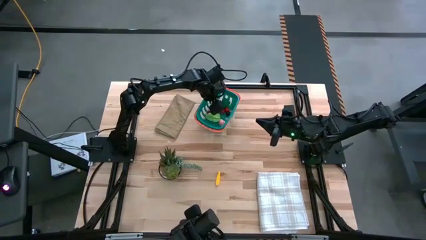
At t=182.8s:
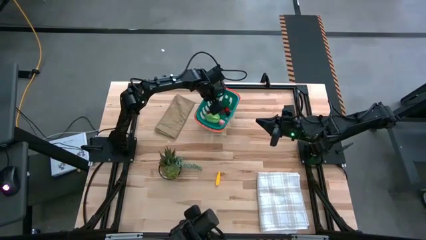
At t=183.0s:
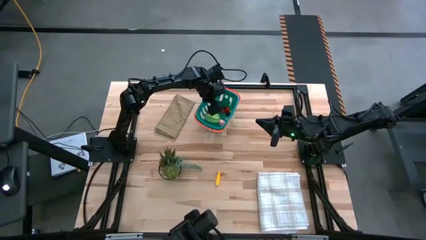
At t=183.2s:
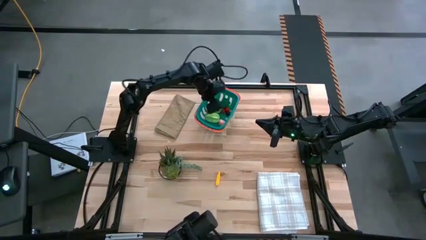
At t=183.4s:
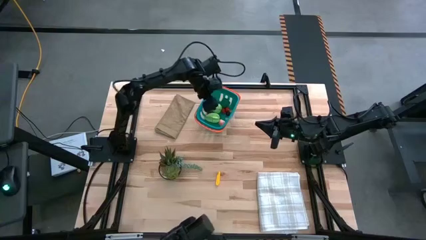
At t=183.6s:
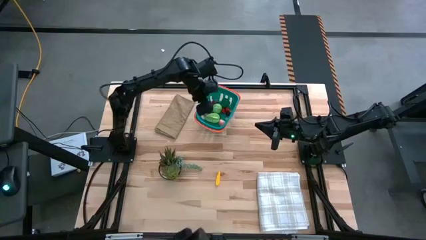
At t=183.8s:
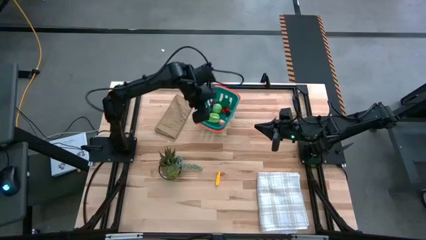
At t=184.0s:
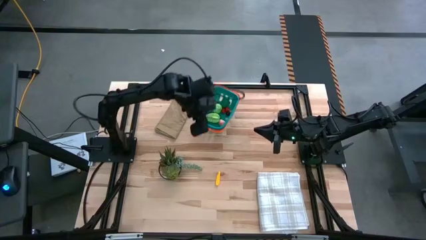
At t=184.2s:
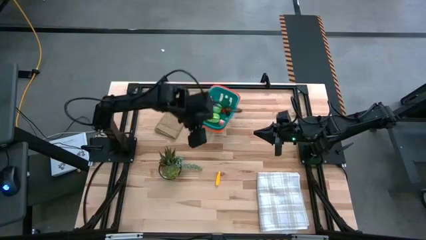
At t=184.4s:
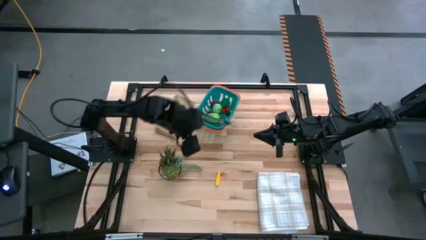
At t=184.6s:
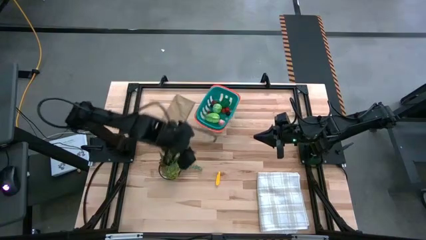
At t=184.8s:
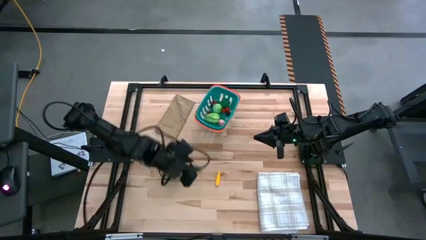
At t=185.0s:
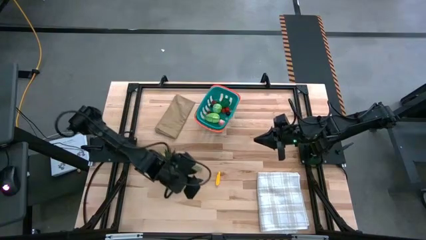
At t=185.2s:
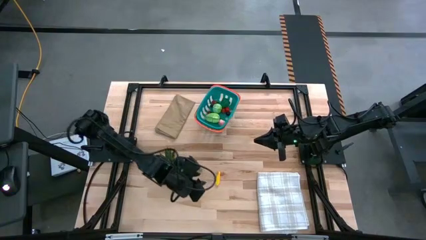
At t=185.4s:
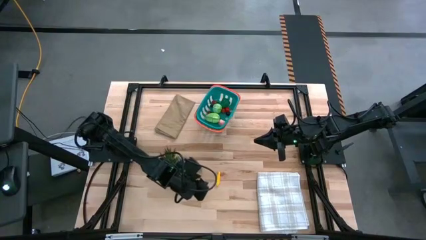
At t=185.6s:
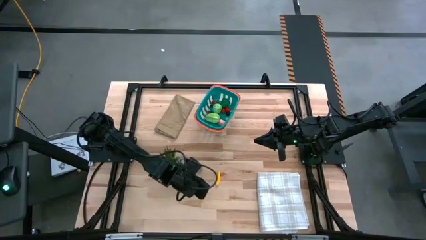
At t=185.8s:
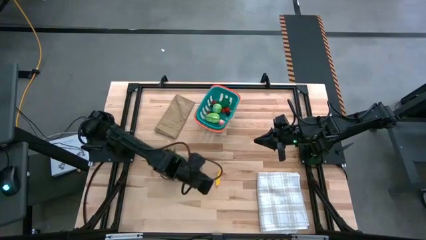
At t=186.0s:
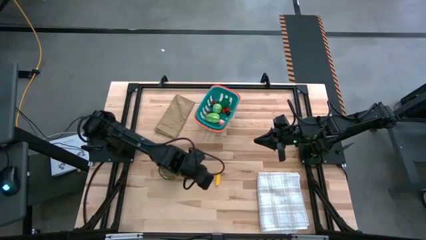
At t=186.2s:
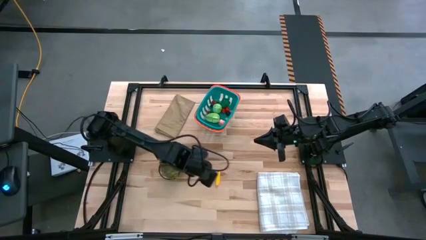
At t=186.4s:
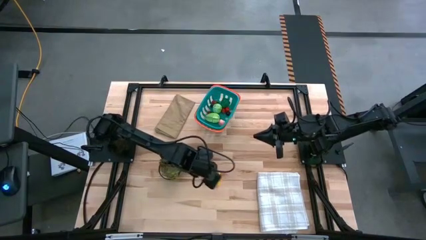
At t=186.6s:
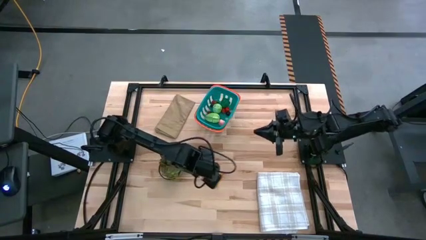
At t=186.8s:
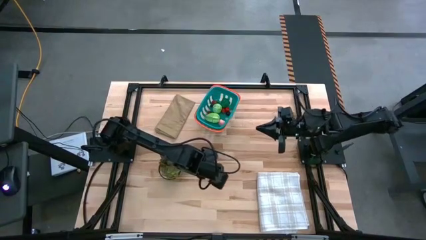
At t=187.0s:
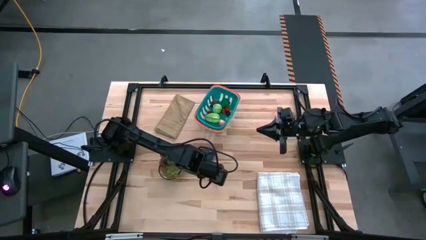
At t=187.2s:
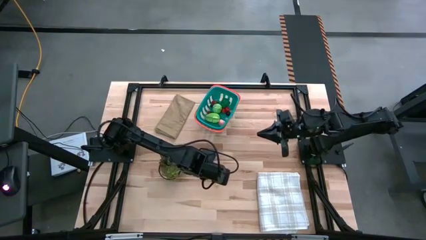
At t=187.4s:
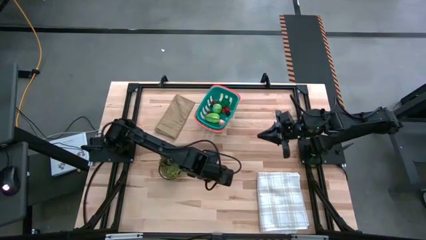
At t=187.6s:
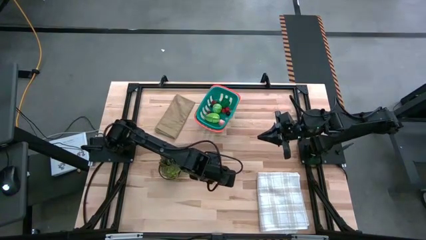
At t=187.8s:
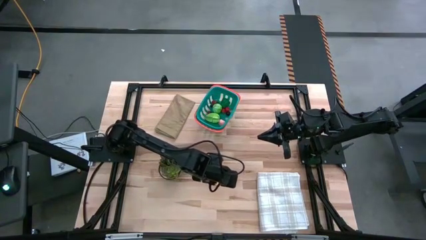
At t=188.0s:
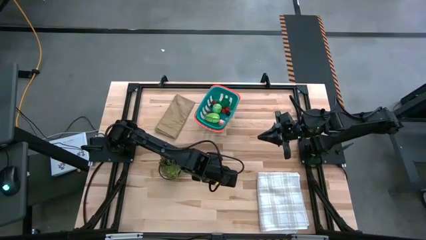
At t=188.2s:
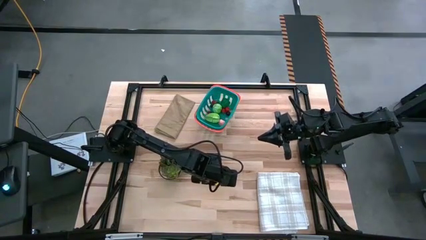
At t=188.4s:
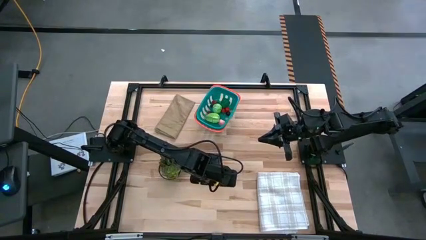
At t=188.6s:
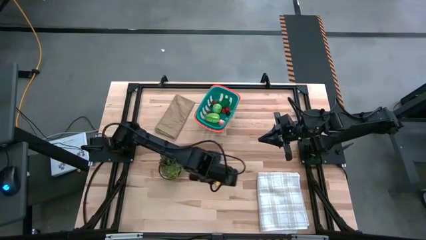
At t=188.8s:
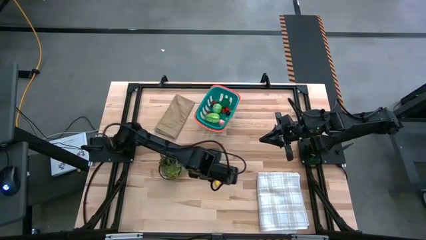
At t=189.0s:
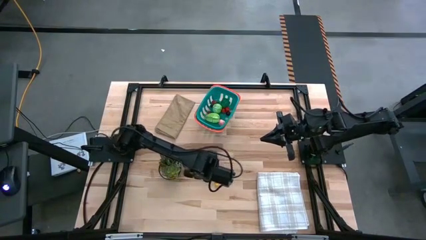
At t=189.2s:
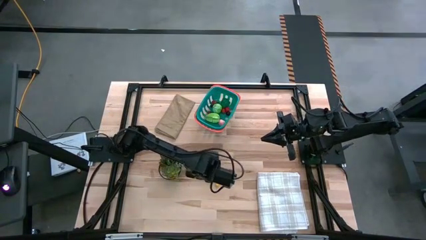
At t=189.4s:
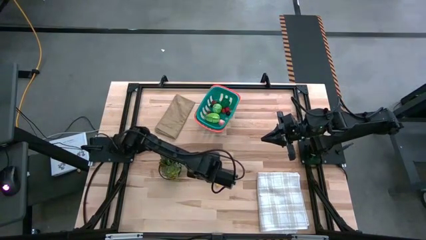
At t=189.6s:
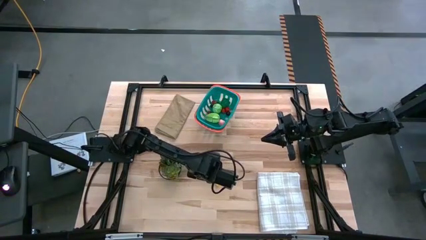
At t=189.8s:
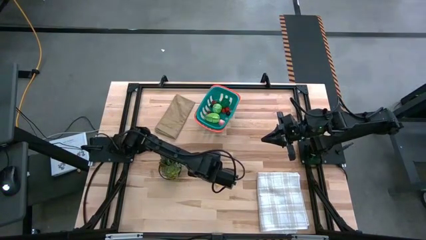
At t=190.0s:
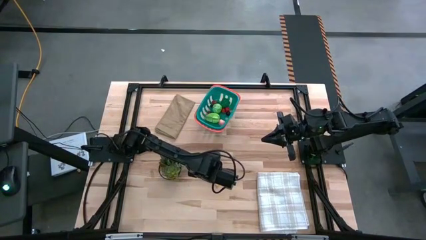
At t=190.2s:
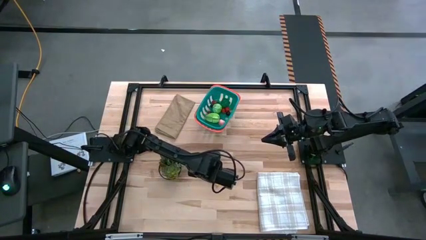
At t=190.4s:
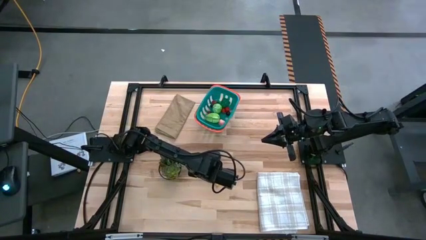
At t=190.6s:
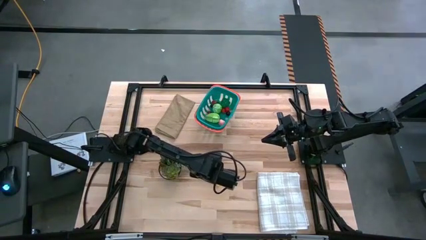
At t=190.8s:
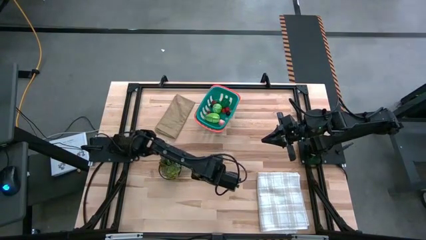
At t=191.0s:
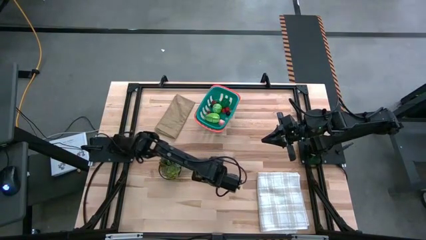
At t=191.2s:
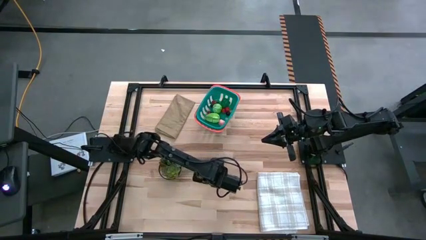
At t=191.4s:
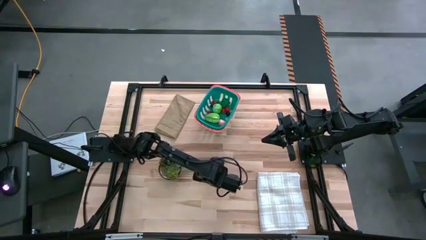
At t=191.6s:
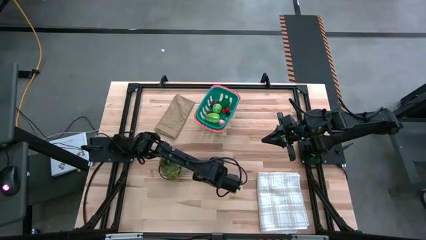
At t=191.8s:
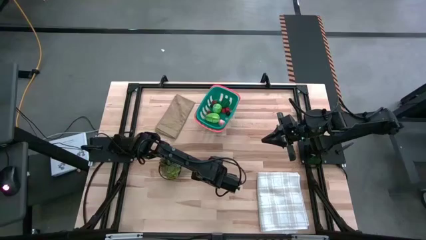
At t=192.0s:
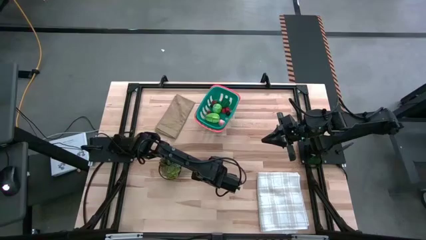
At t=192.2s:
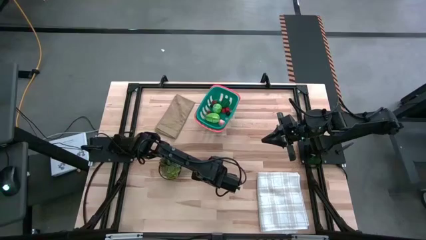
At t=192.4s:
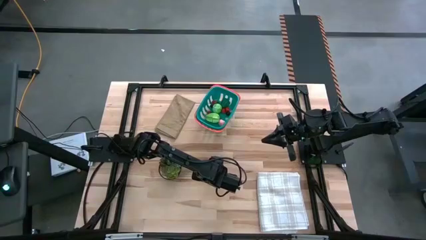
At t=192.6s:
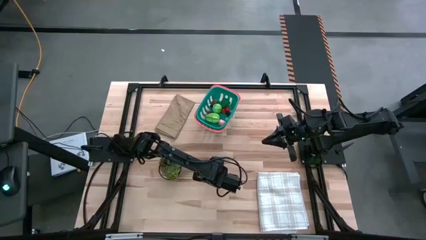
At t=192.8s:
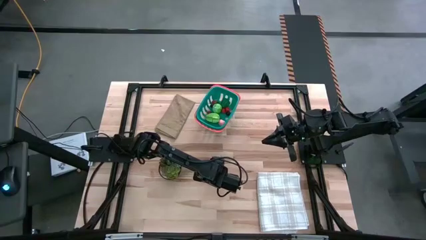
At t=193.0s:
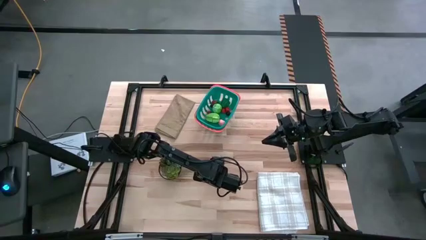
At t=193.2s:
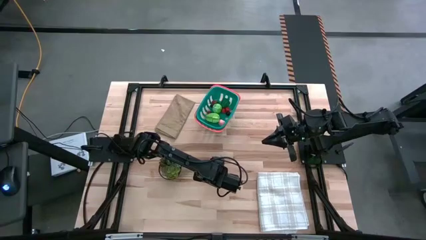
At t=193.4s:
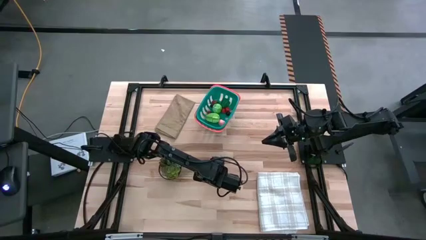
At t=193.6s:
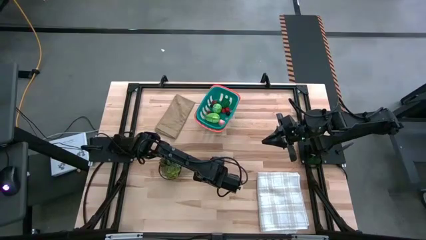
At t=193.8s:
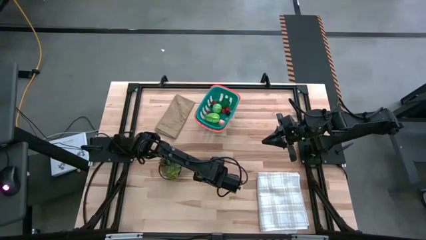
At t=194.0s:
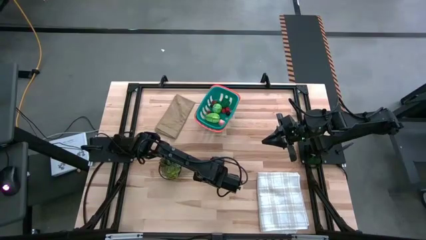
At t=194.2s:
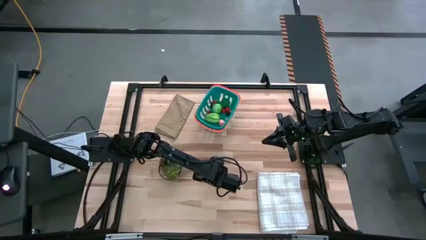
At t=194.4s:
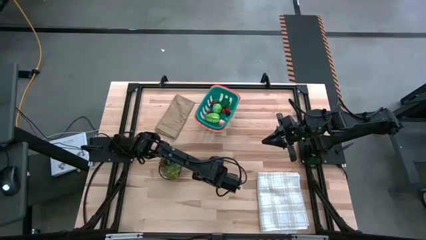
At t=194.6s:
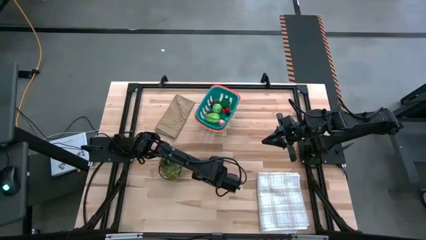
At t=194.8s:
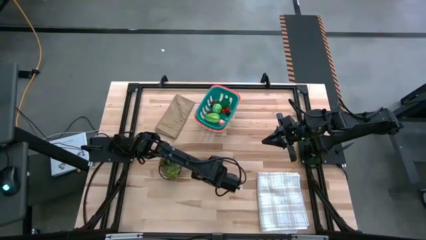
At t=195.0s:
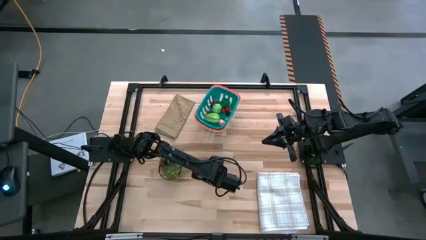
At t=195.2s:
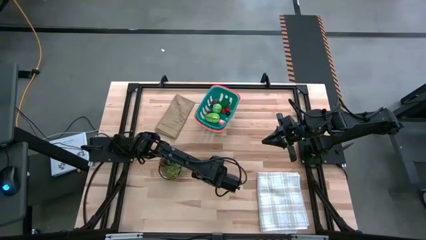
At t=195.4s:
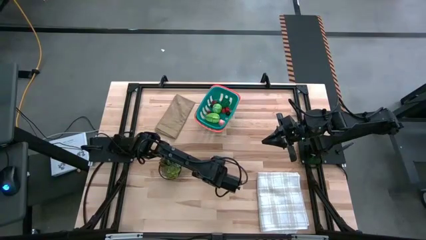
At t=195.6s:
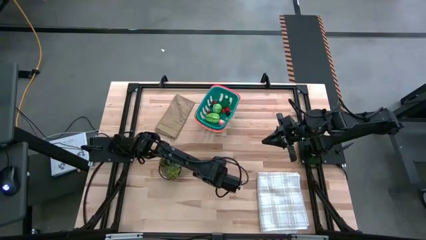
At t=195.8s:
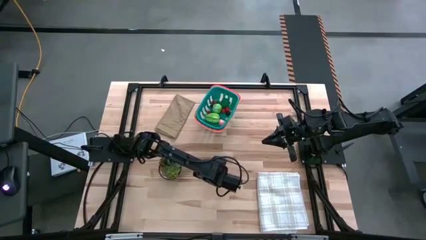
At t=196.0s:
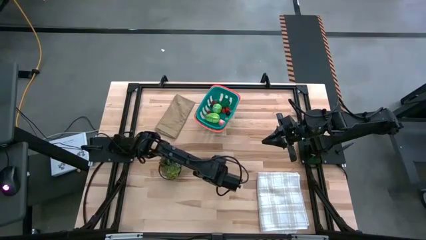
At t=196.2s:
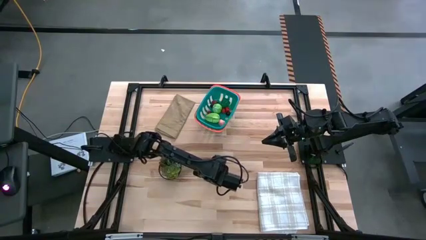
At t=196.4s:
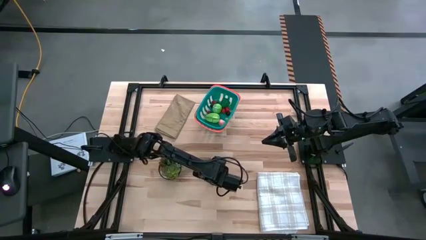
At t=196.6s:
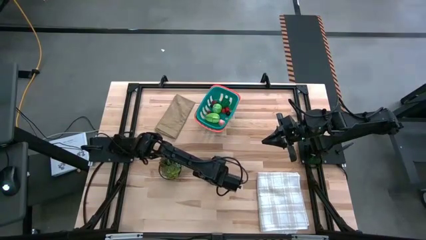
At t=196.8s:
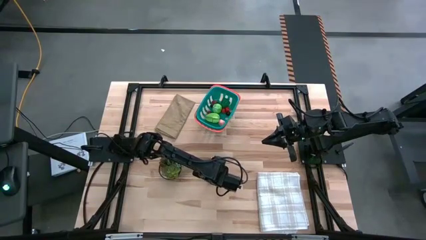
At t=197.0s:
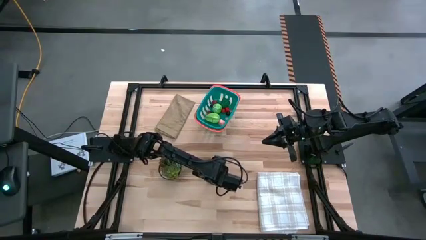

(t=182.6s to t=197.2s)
Task: Pick and placing Produce into tupperware
Put the yellow corn in the green basket
